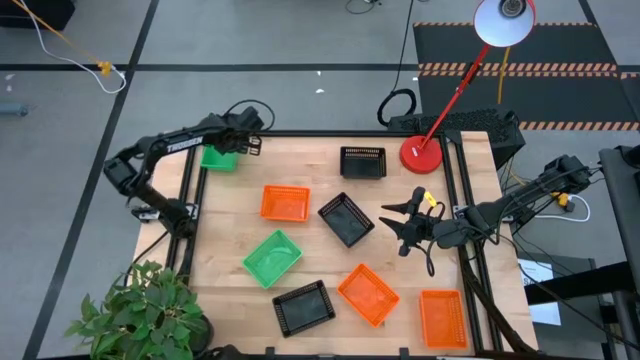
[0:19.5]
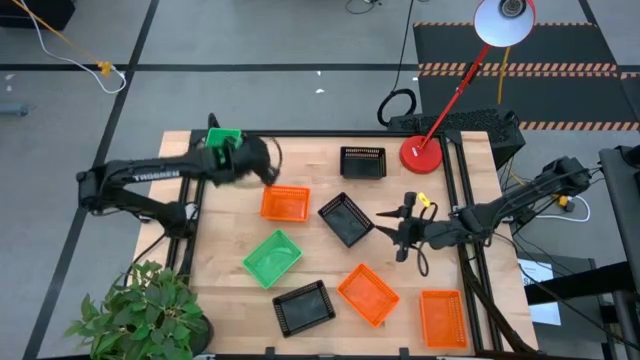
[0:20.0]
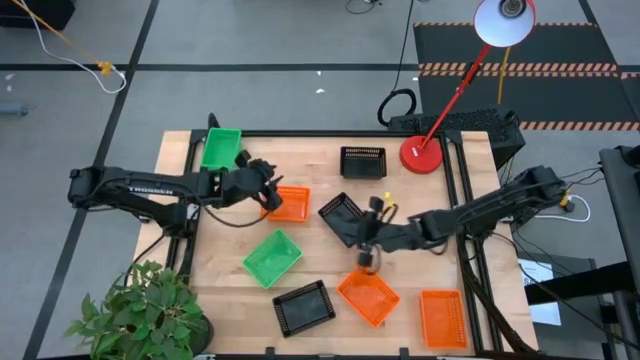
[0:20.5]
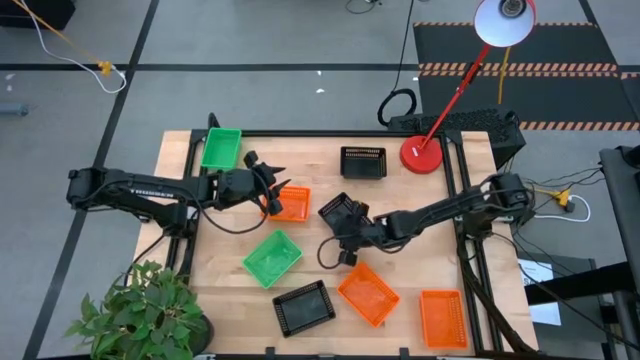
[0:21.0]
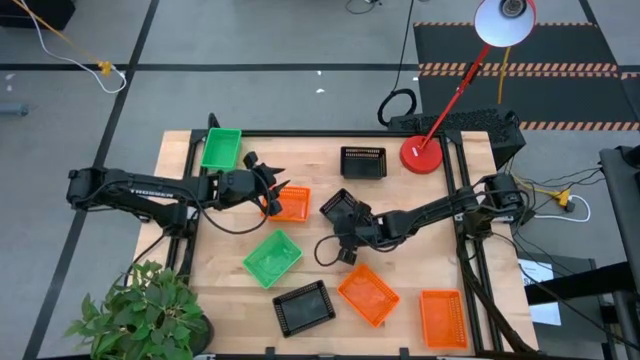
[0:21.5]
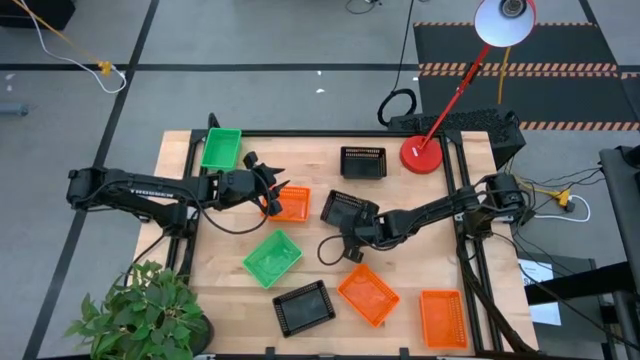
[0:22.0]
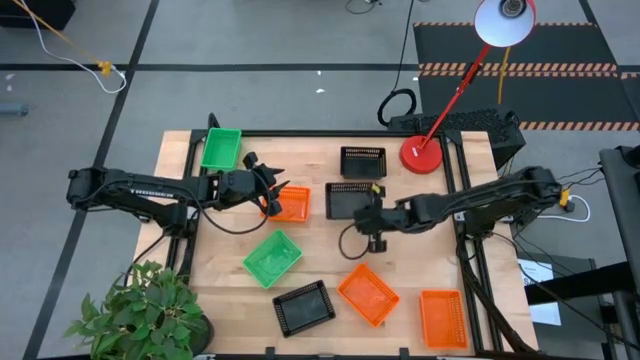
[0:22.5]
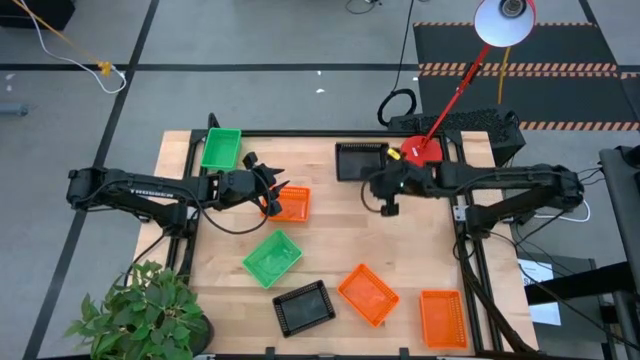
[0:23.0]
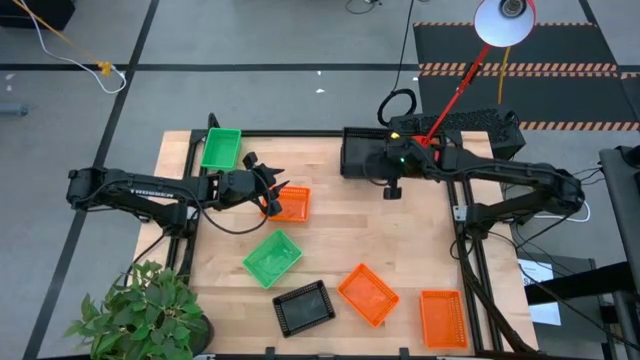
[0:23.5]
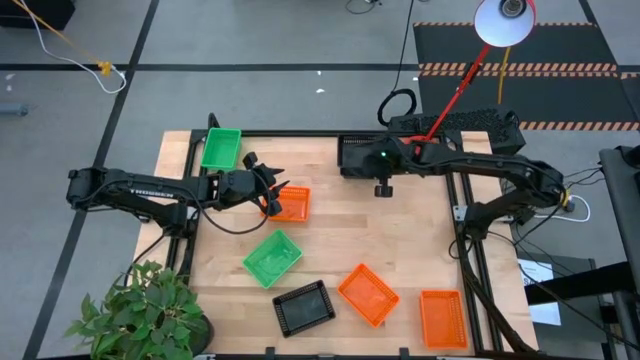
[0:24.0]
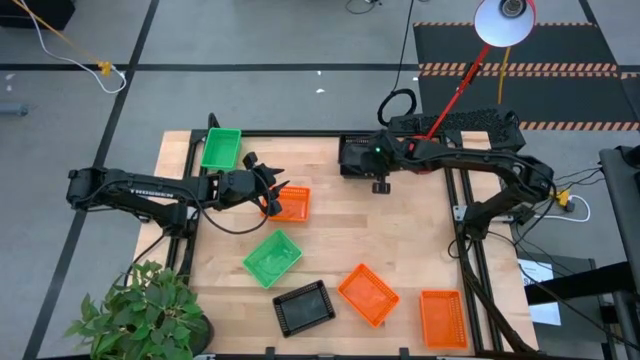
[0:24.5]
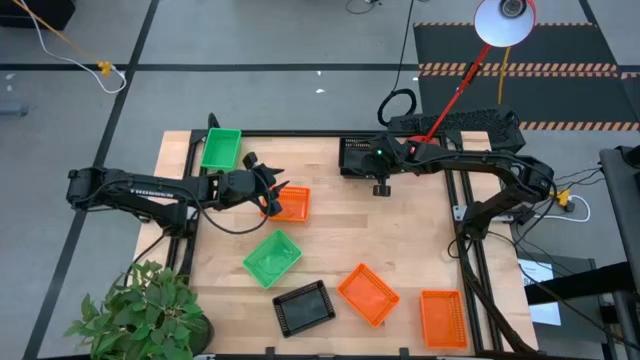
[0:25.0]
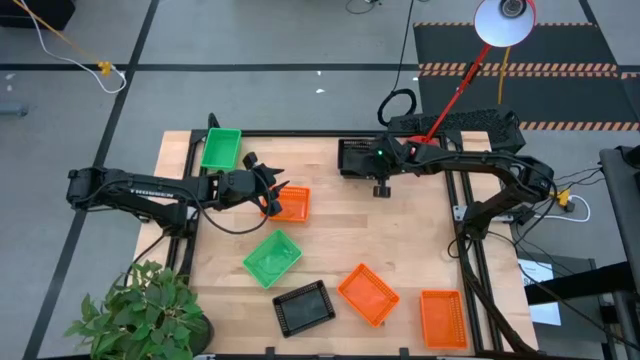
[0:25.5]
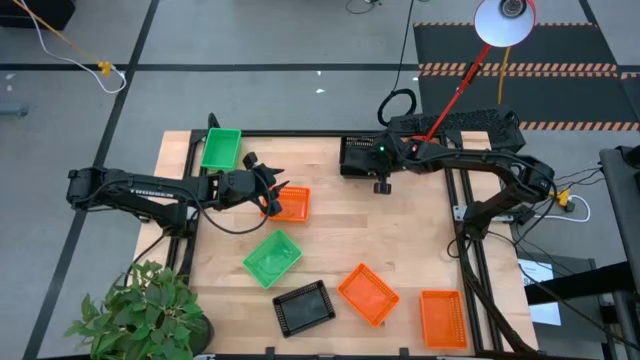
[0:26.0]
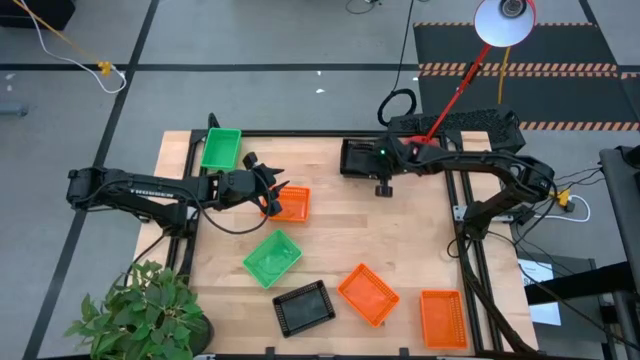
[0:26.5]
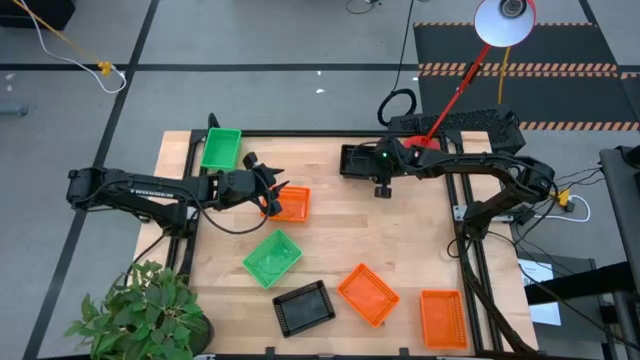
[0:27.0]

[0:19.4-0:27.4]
Stack the middle black bin on top of the top black bin

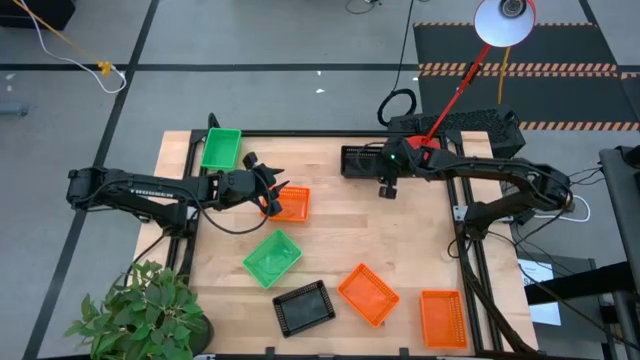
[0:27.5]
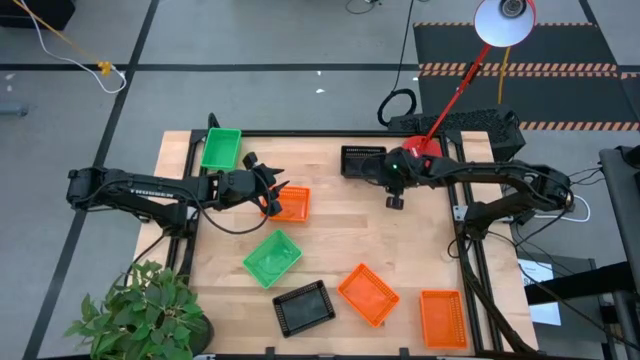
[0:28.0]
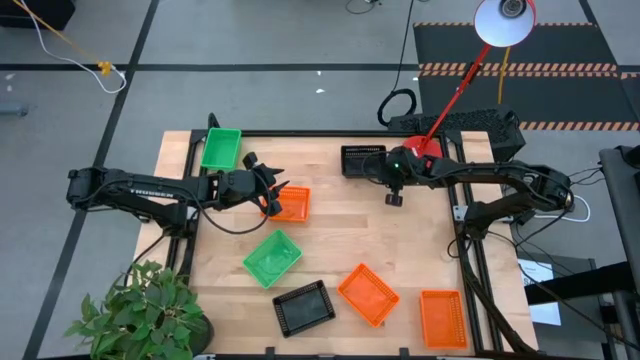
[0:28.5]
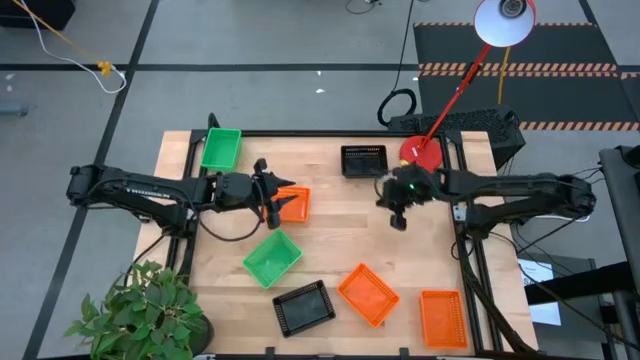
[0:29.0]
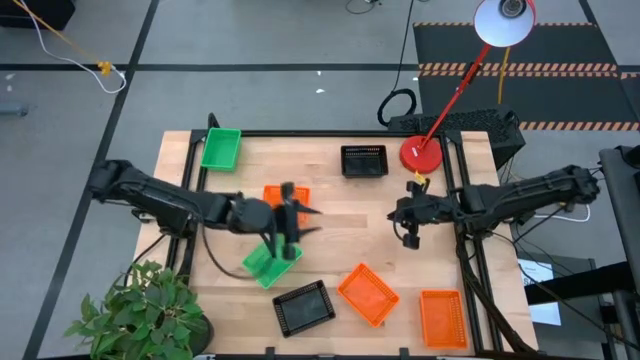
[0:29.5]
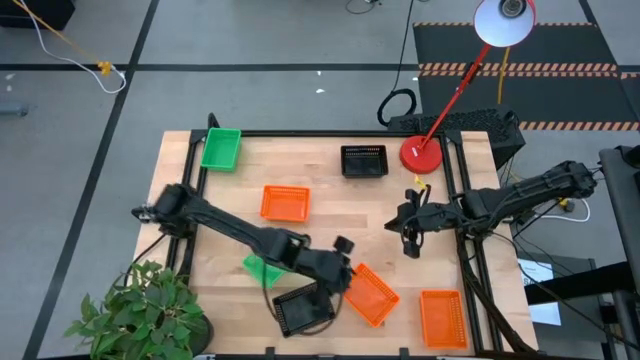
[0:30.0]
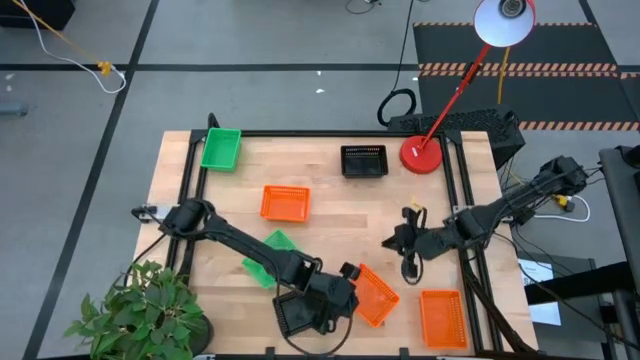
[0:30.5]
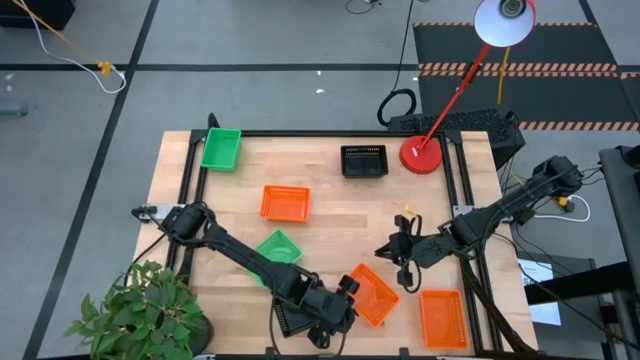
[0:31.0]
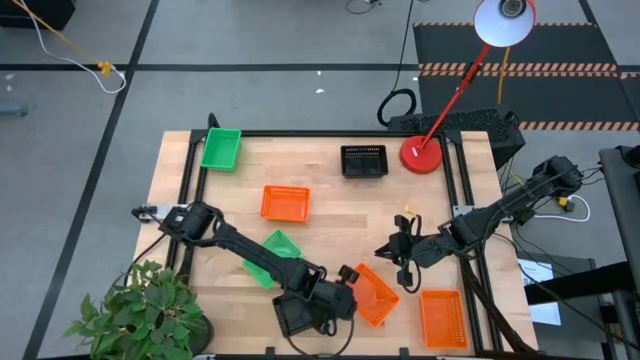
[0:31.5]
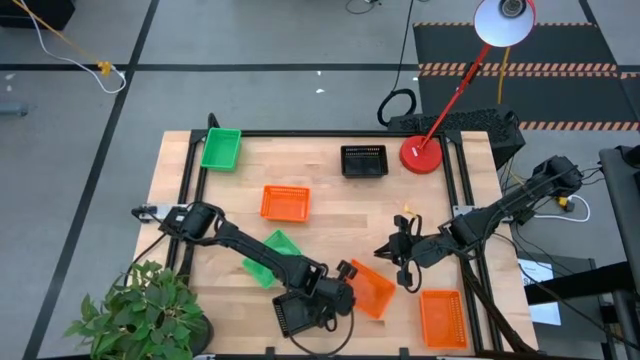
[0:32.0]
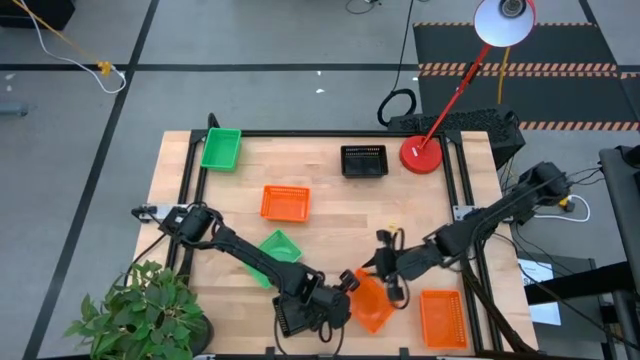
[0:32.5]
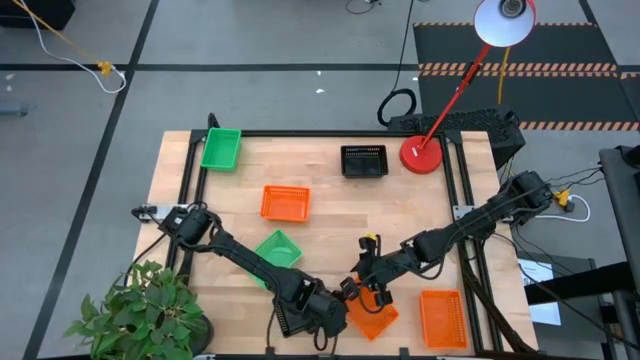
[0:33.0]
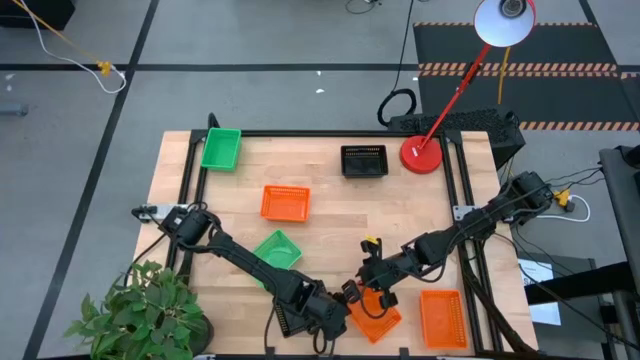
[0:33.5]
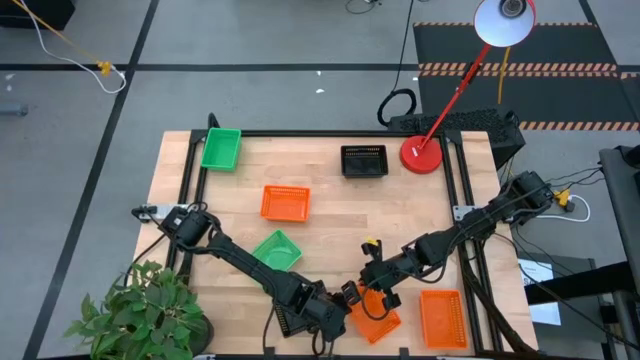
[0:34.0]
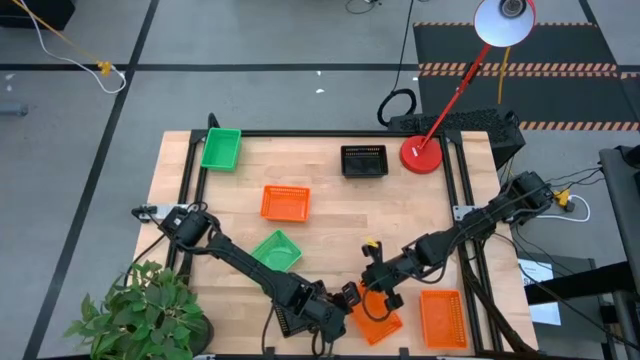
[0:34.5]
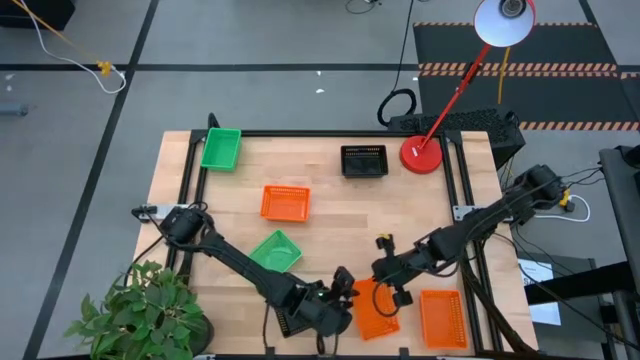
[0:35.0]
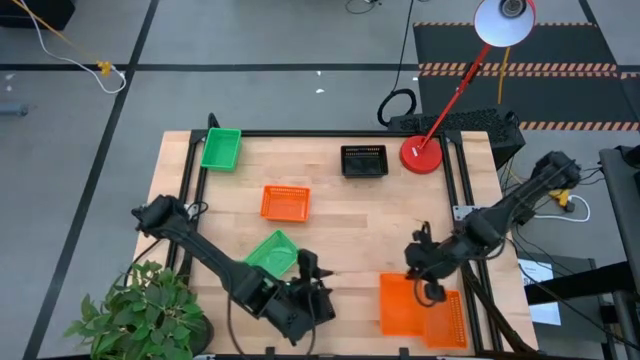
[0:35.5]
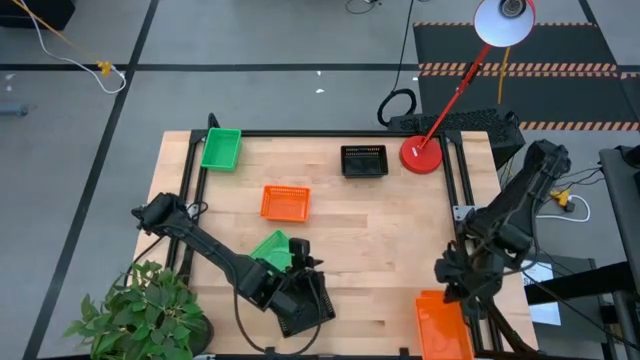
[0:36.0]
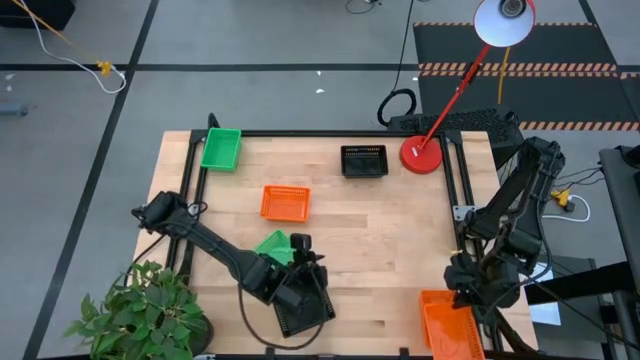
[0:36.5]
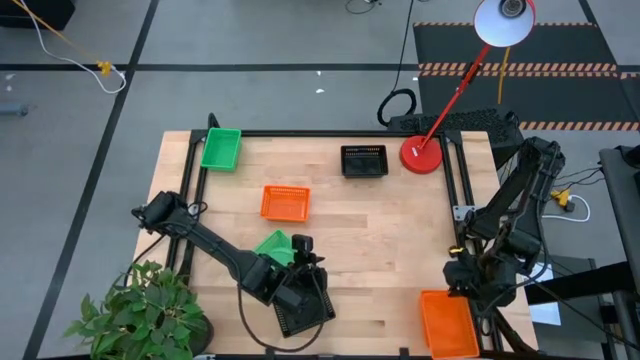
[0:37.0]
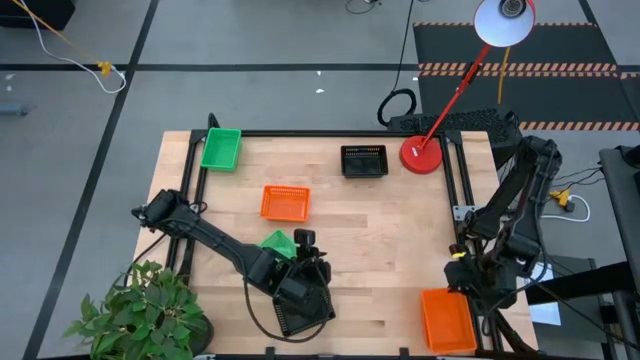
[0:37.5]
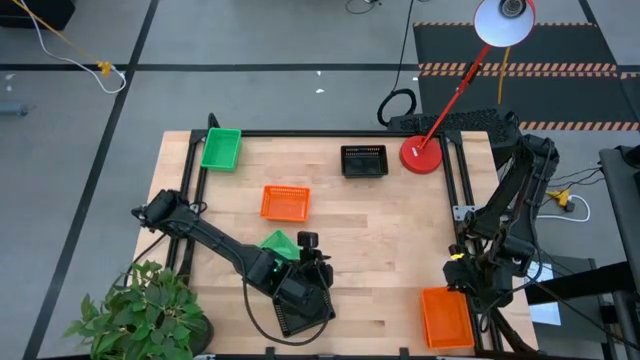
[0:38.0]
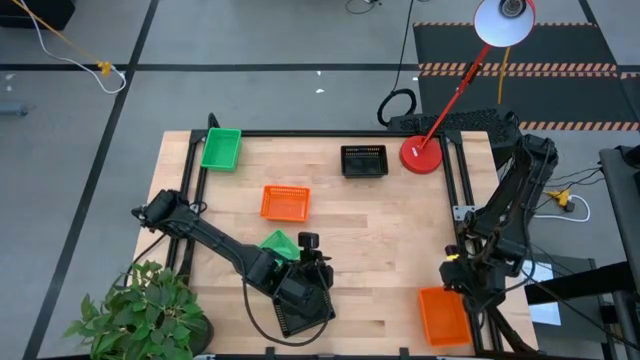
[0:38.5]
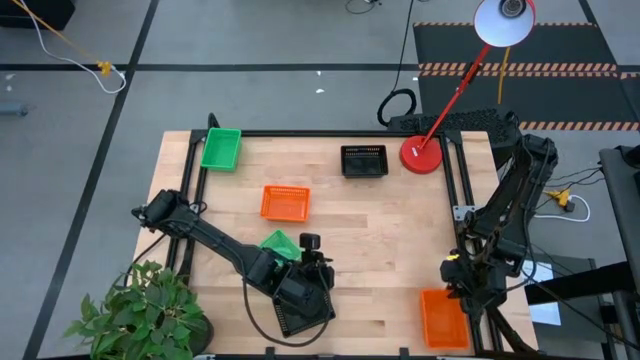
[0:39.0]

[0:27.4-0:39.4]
Stack the middle orange bin on top of the right orange bin
